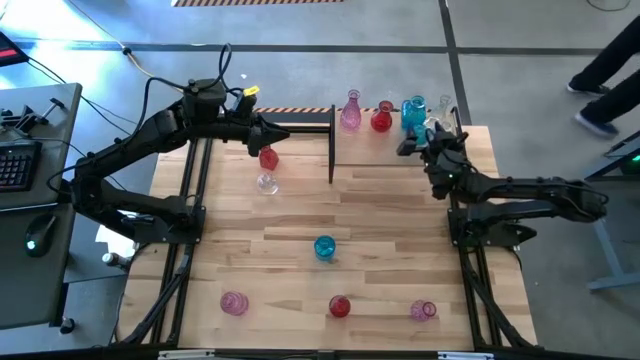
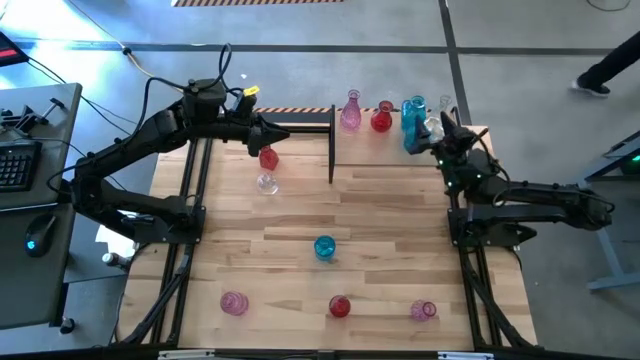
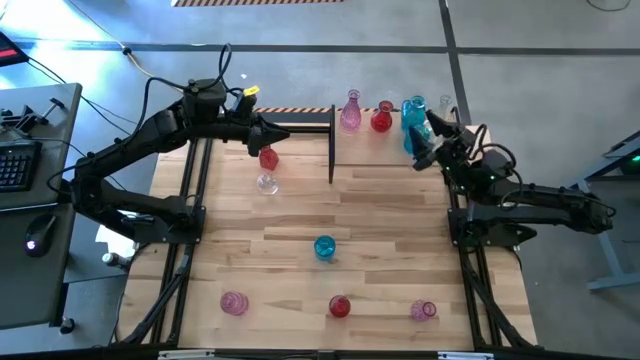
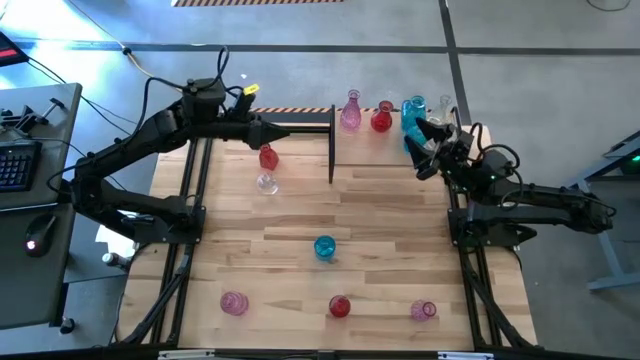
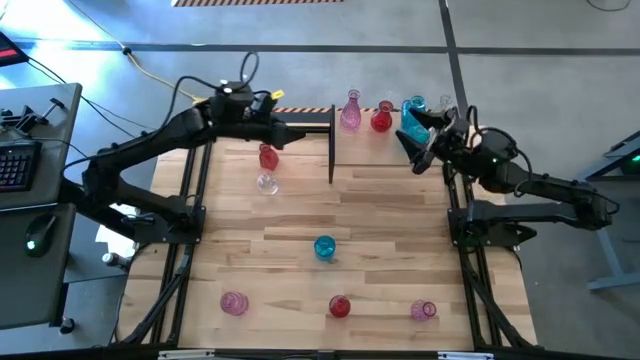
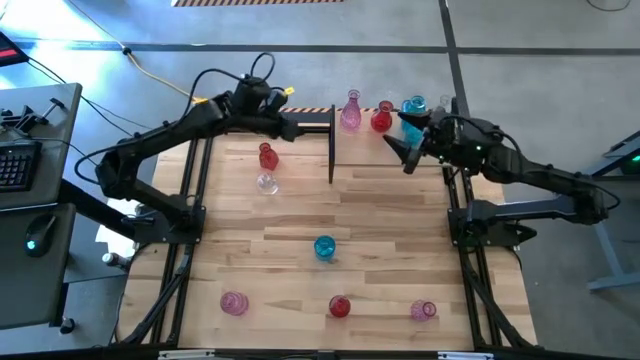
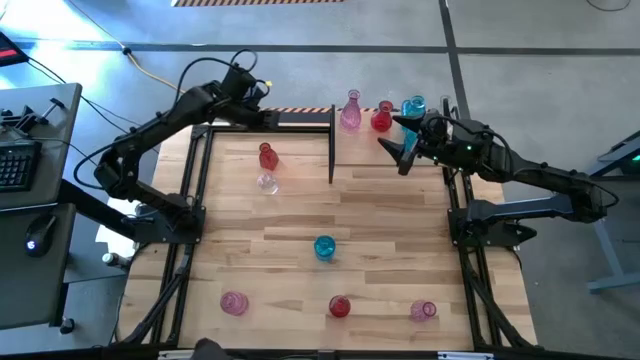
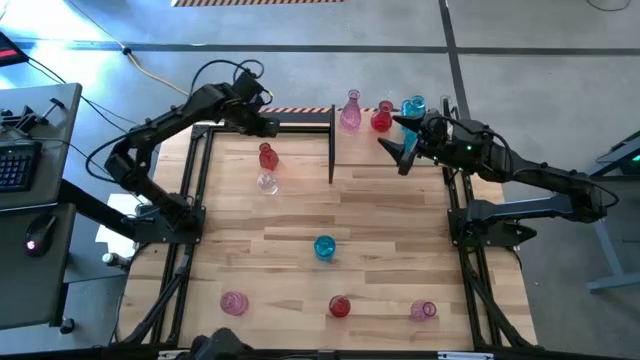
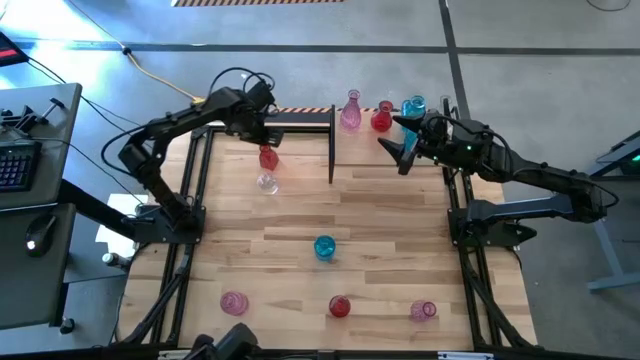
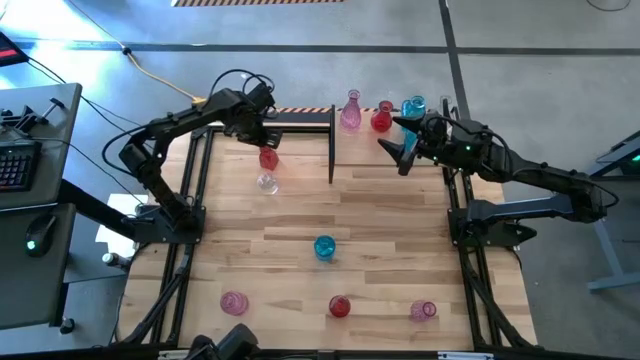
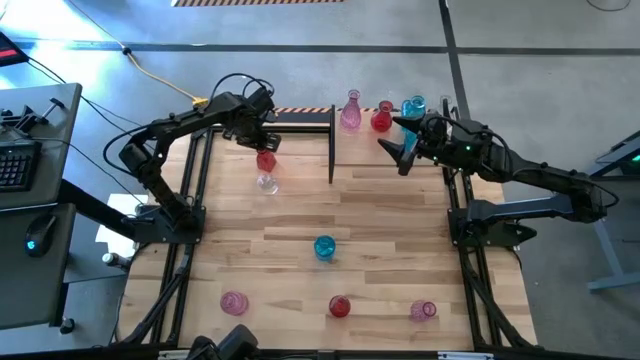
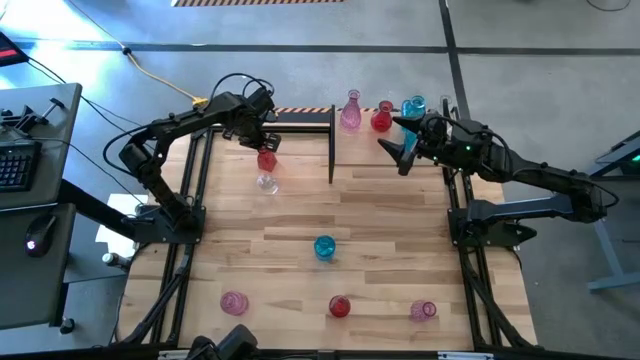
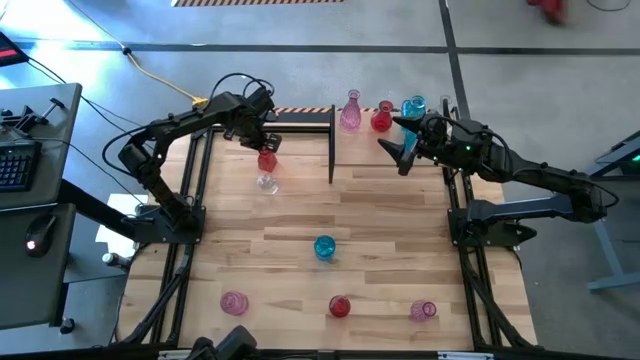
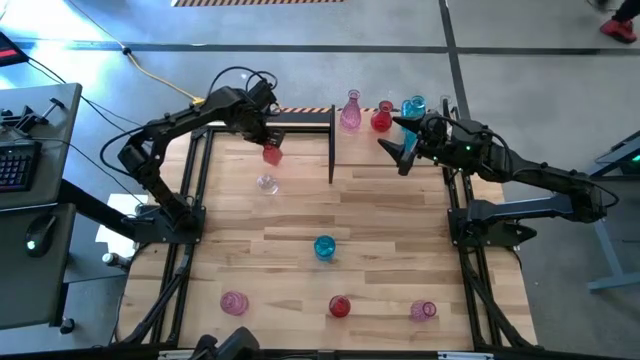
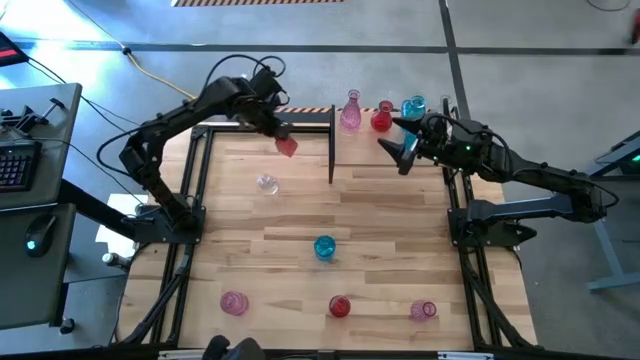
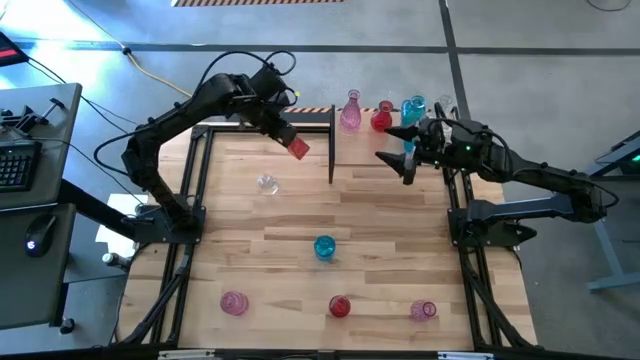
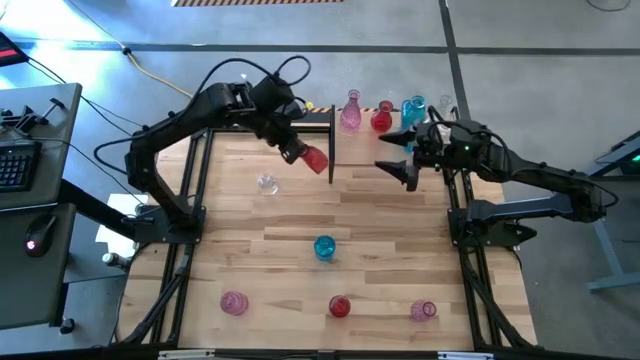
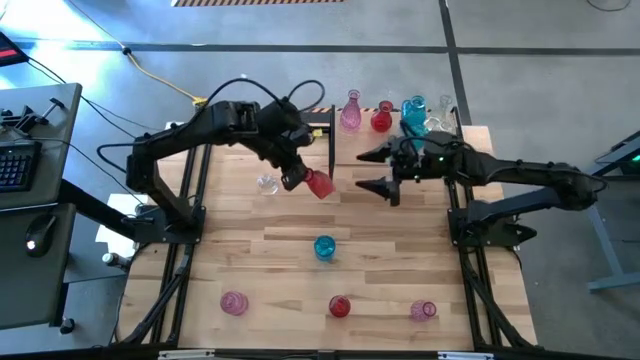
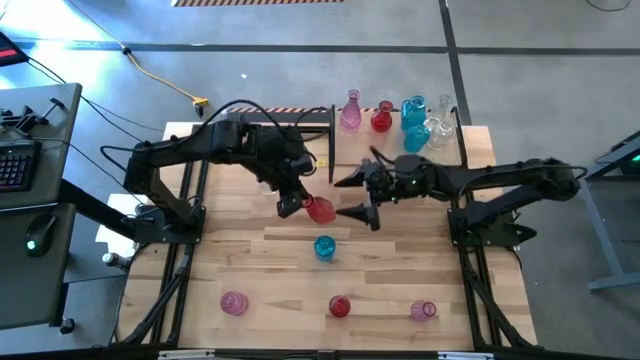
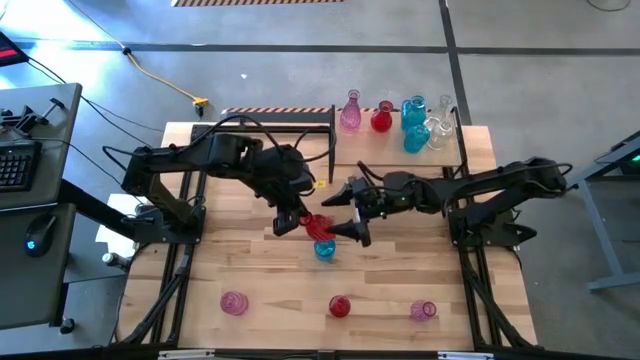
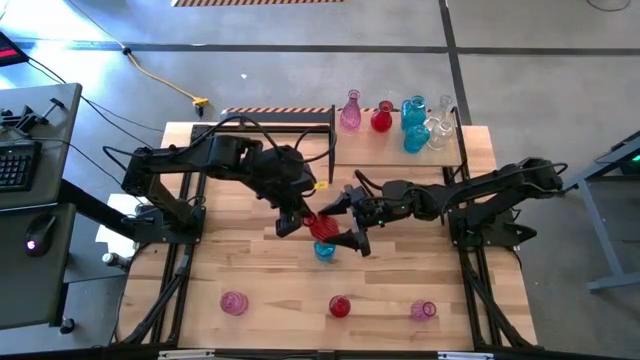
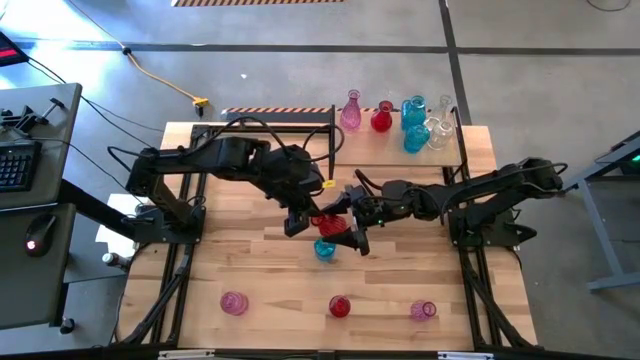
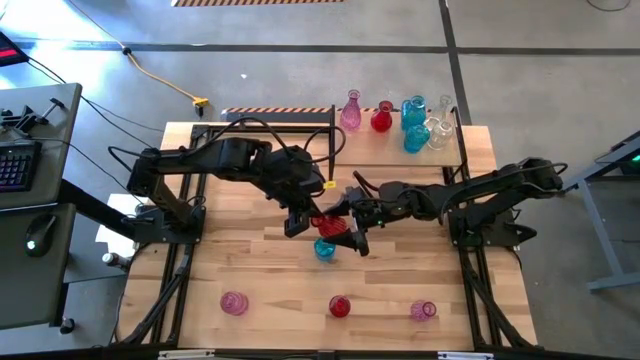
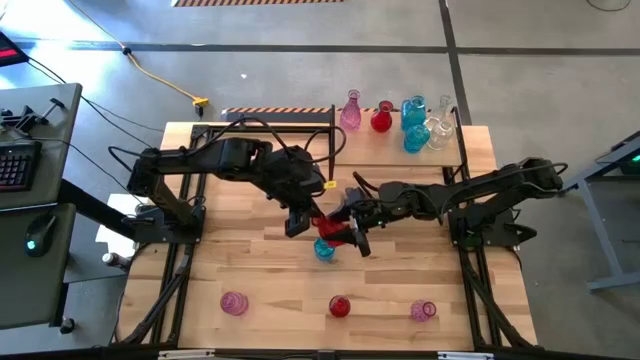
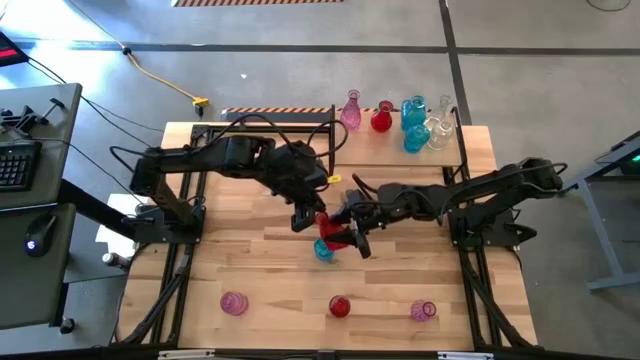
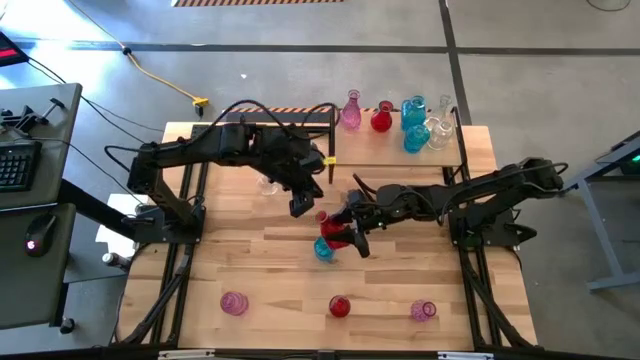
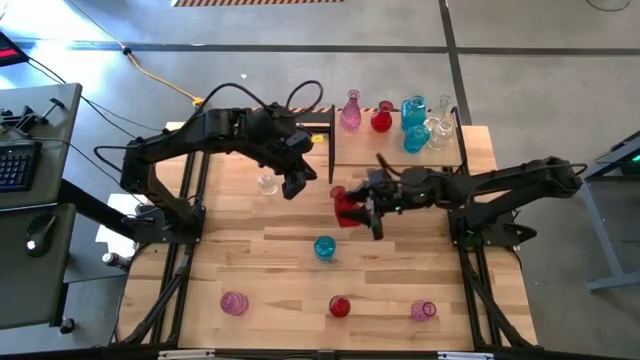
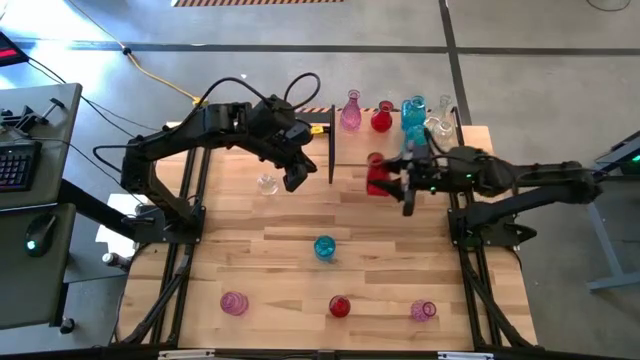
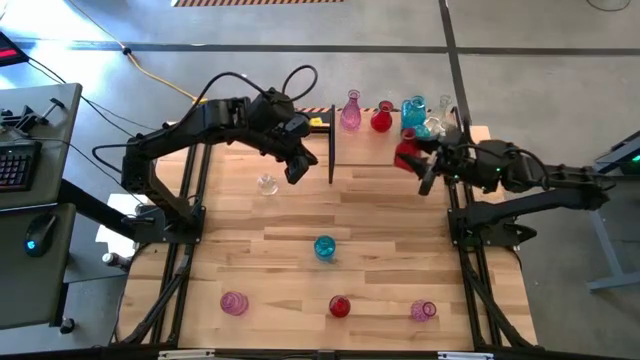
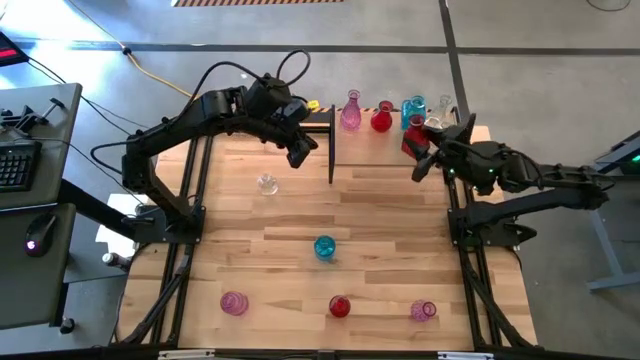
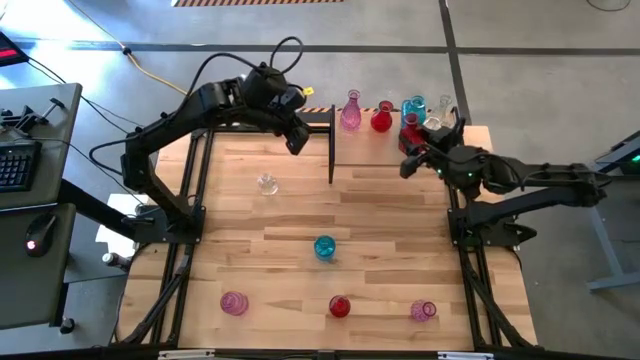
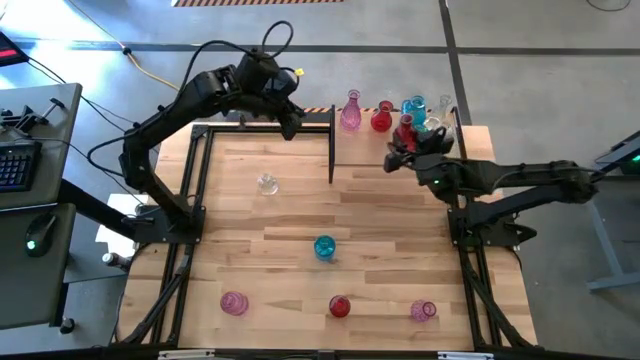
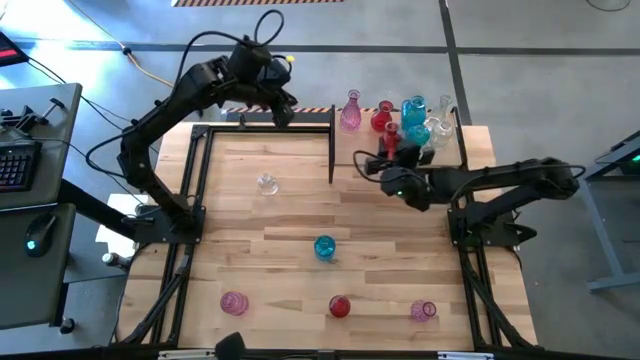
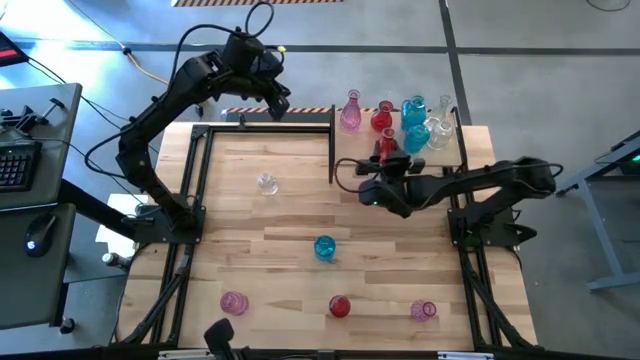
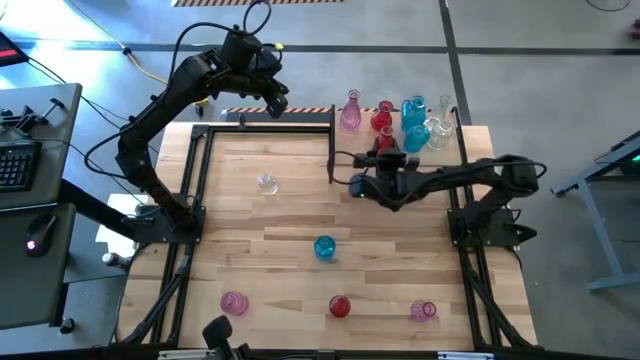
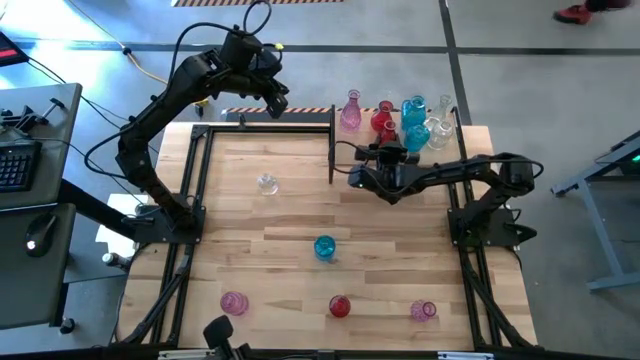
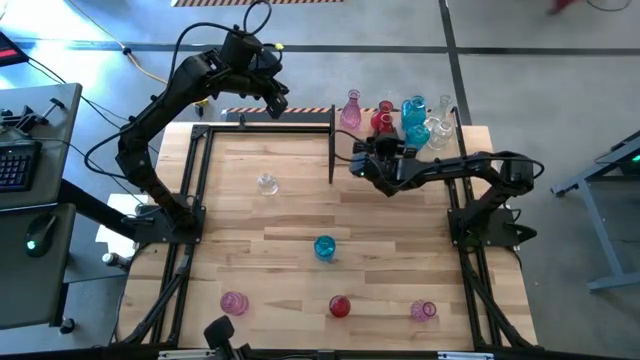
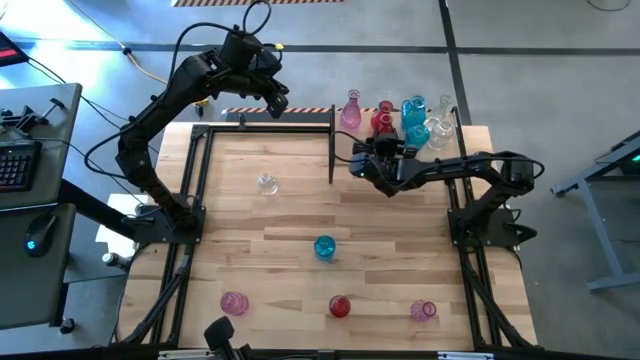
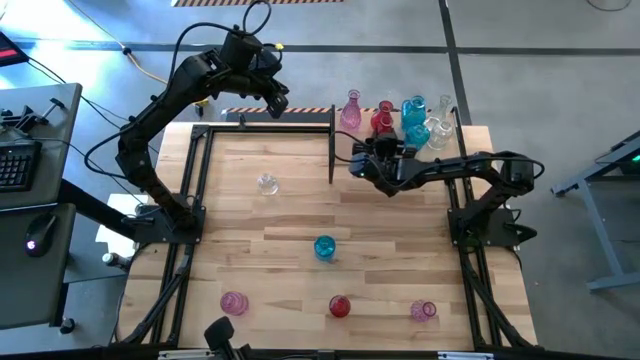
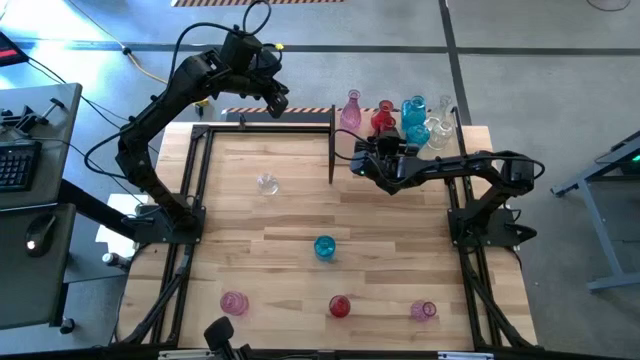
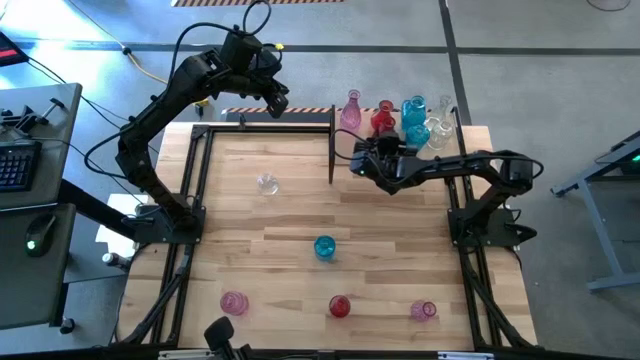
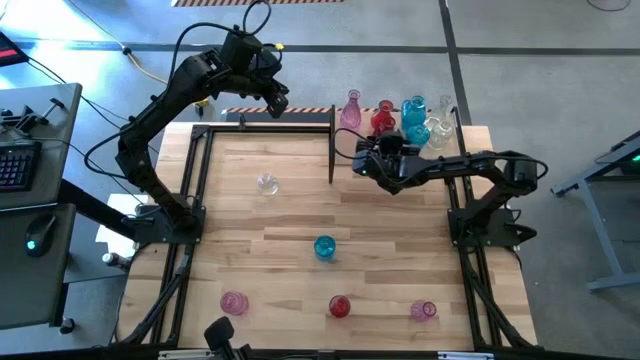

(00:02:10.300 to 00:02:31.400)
Task: sort vases onto shelf
Put the top red vase on the shelf aligned with the red vase

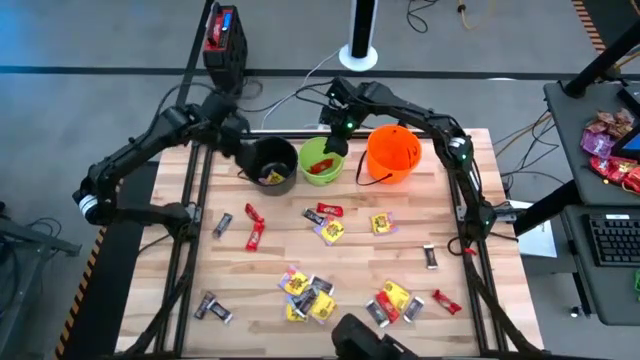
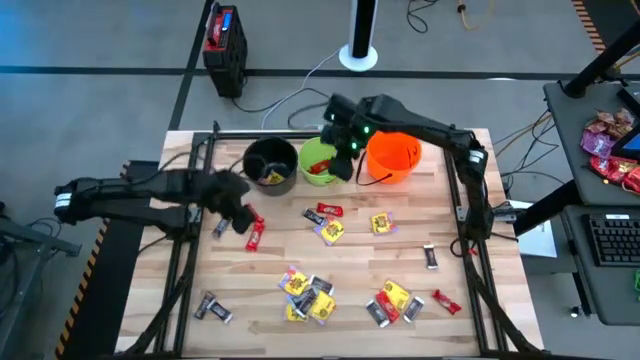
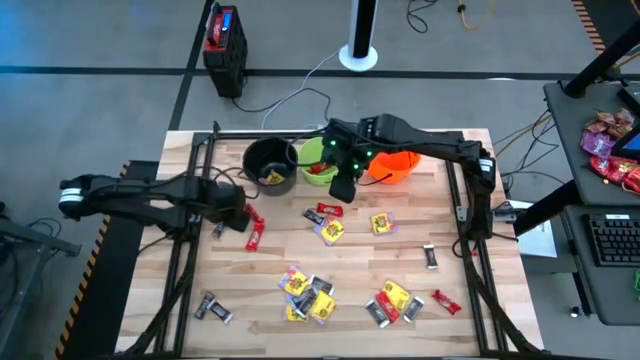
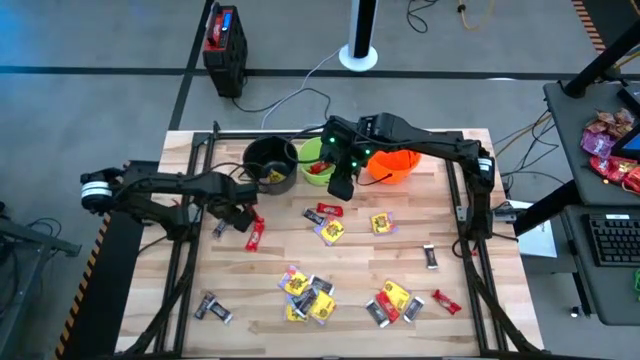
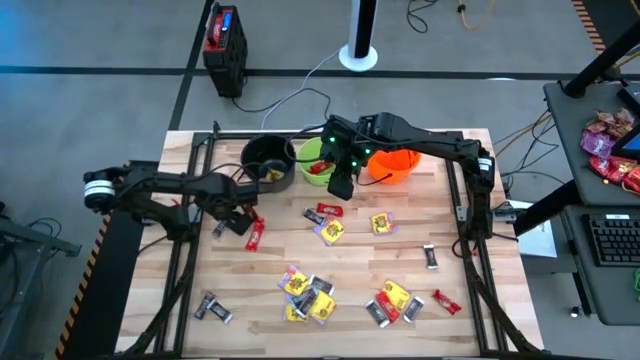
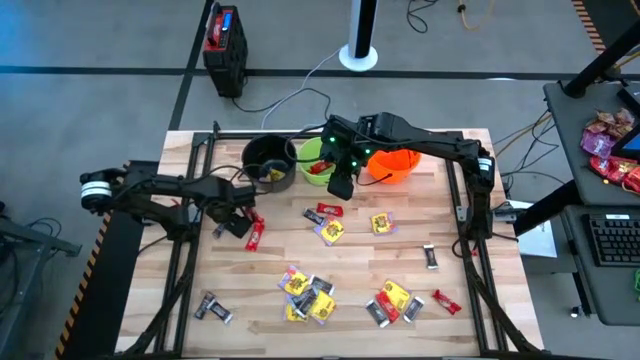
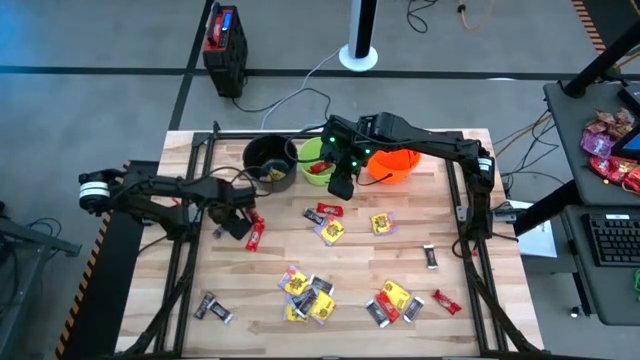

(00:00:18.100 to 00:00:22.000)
Task: Sort candy by brand, put in halloween buckets
Put the brown chocolate bar into the orange bucket
